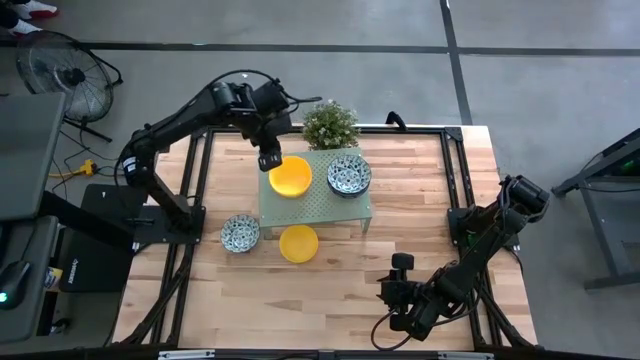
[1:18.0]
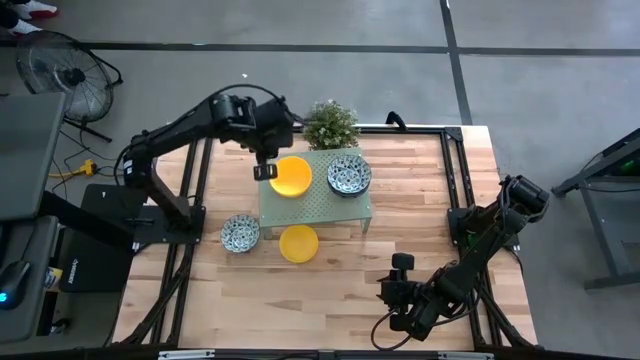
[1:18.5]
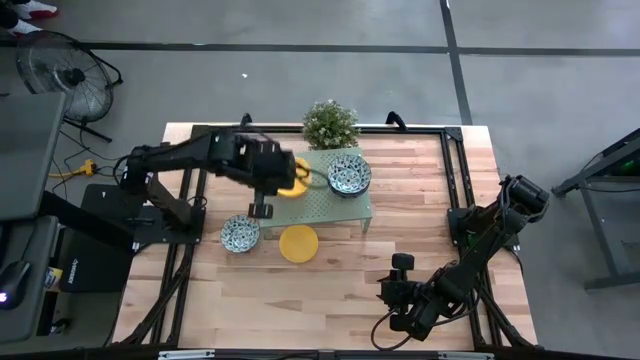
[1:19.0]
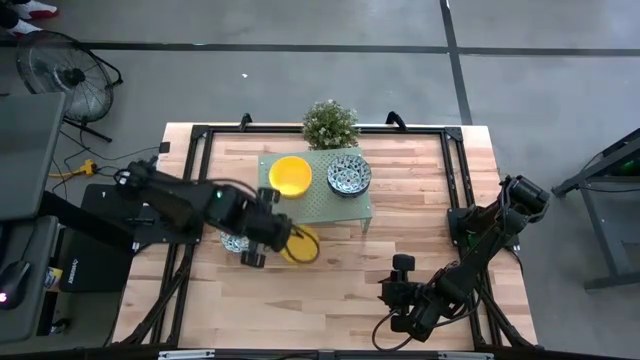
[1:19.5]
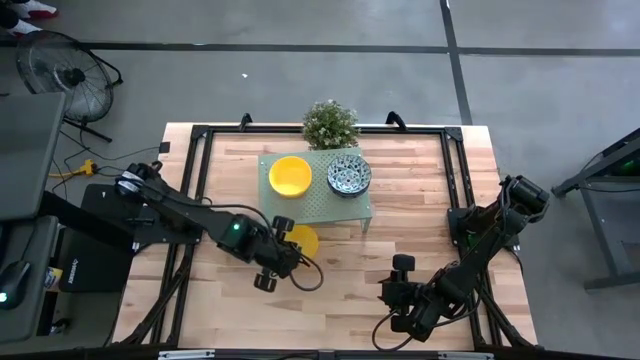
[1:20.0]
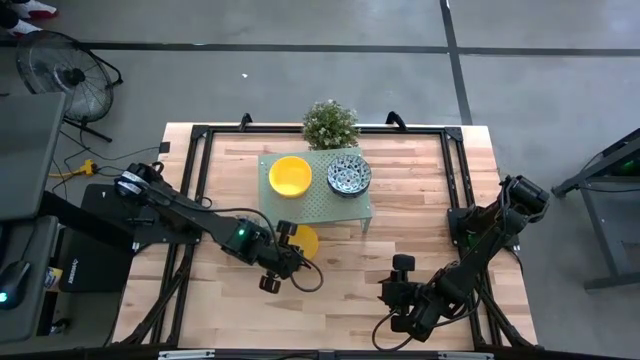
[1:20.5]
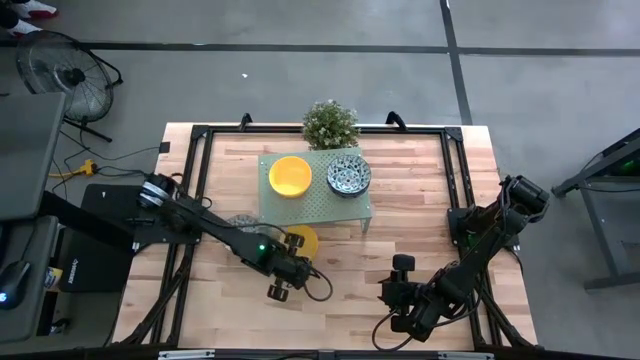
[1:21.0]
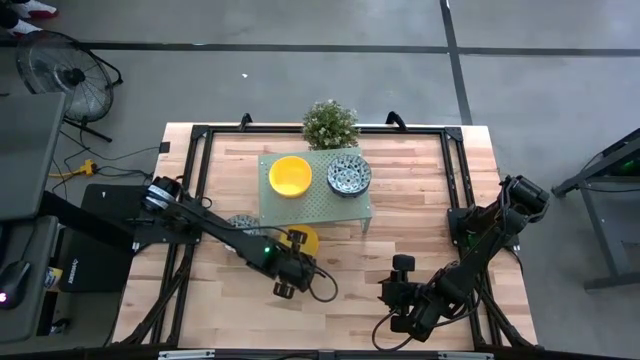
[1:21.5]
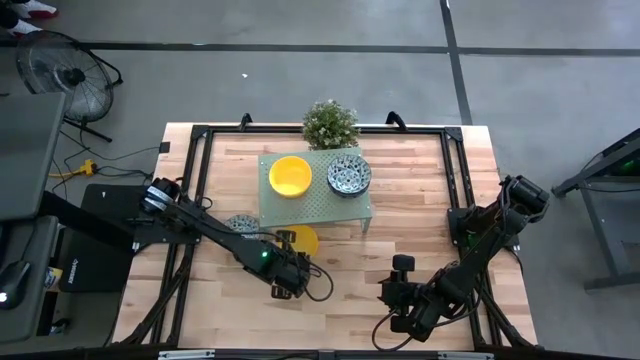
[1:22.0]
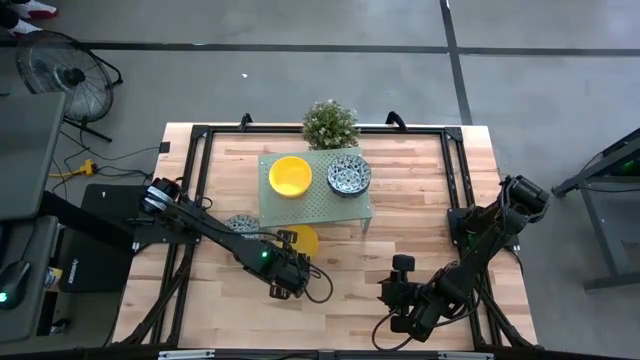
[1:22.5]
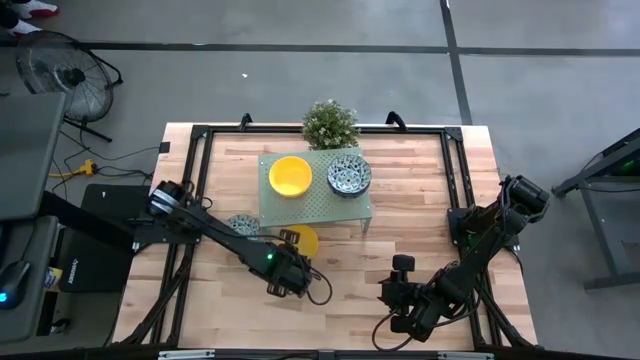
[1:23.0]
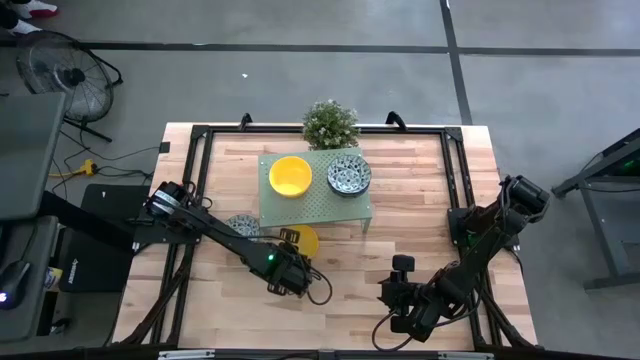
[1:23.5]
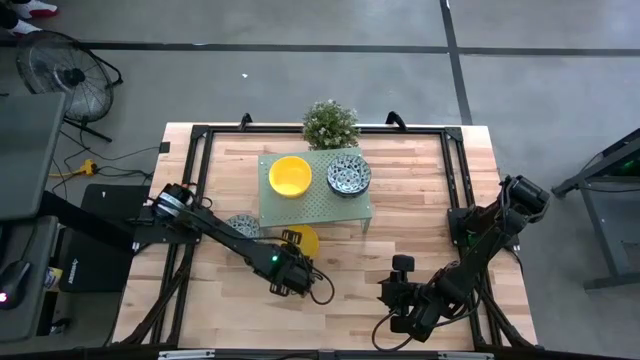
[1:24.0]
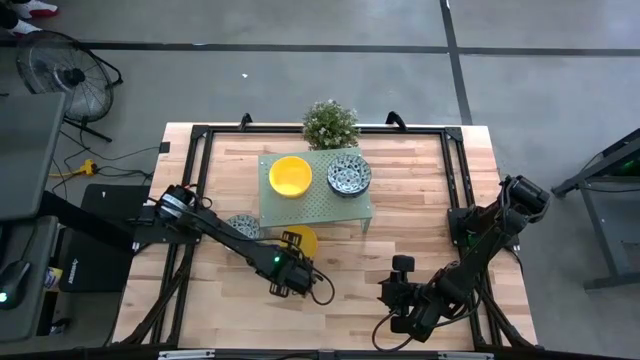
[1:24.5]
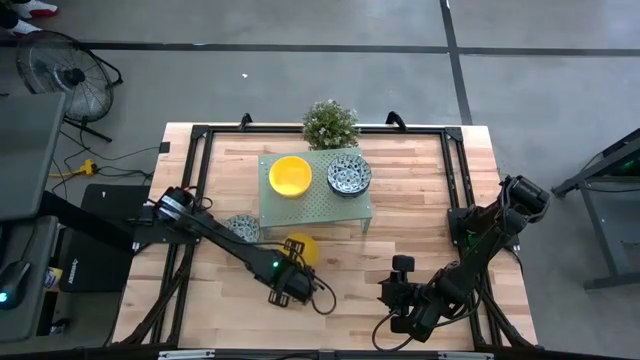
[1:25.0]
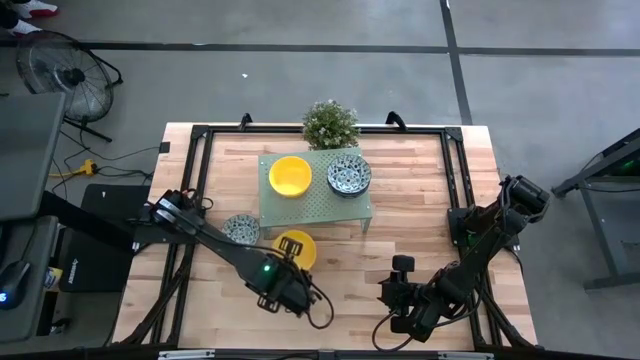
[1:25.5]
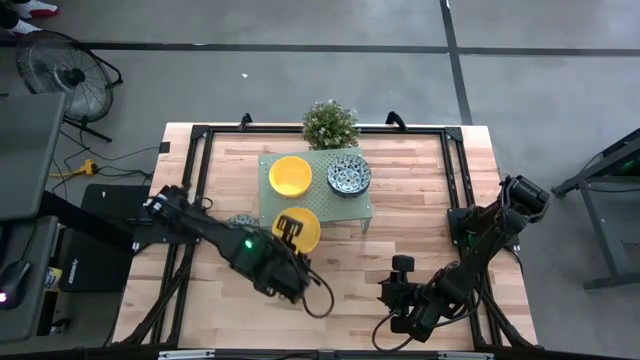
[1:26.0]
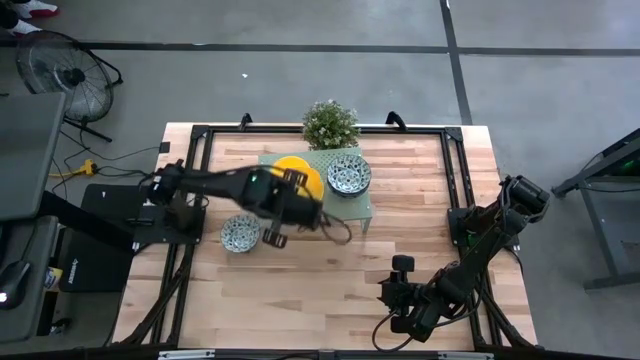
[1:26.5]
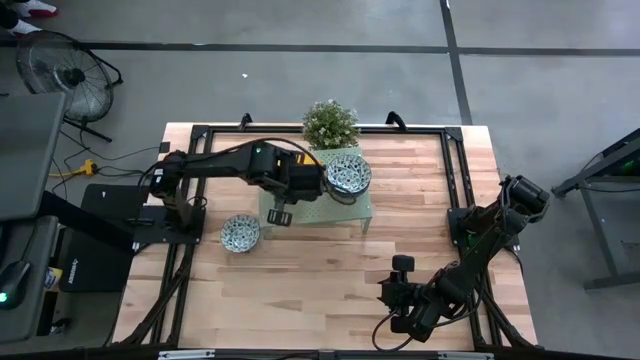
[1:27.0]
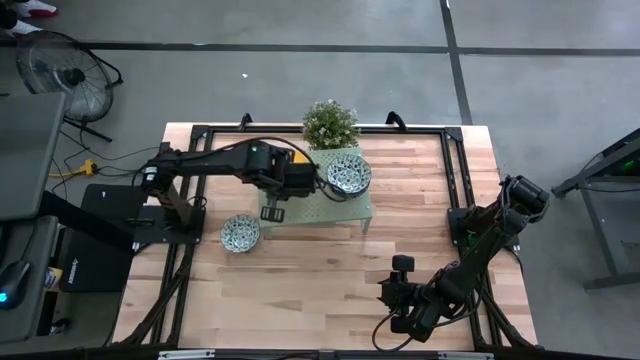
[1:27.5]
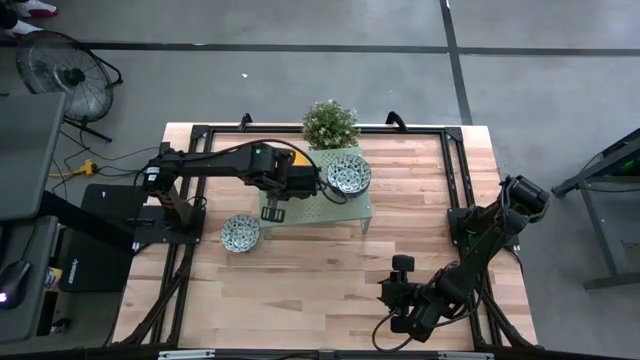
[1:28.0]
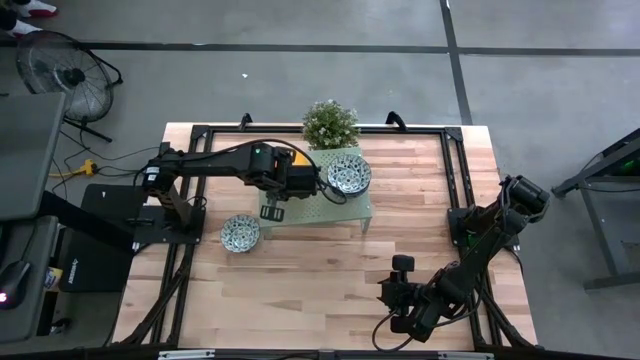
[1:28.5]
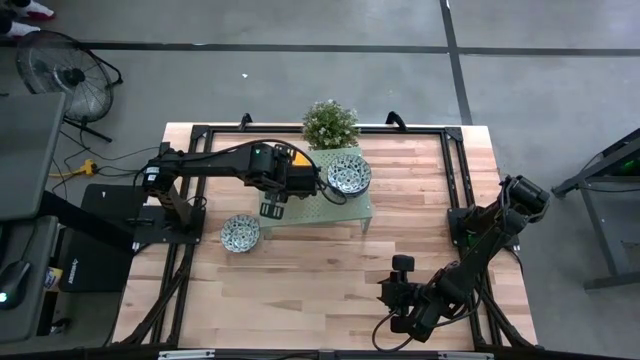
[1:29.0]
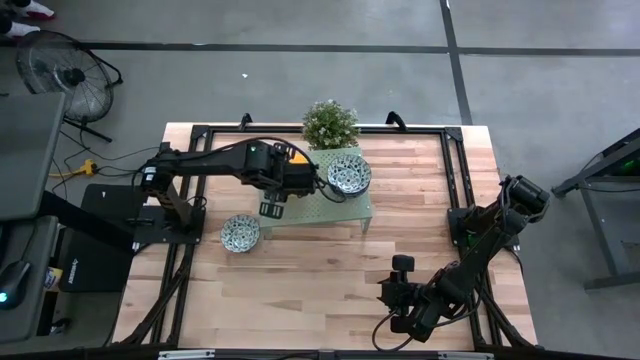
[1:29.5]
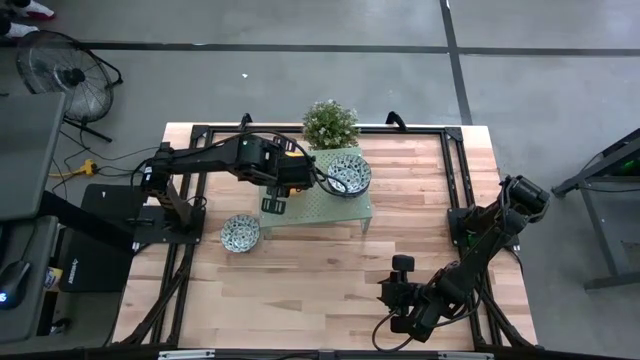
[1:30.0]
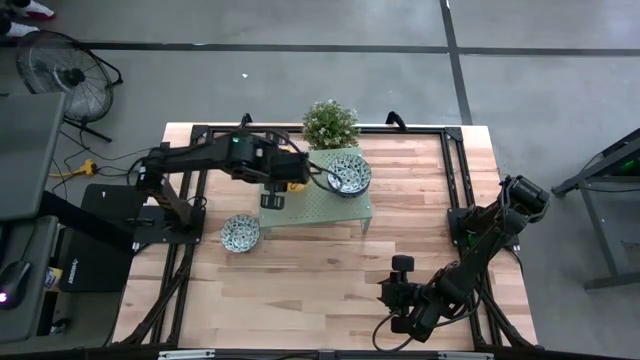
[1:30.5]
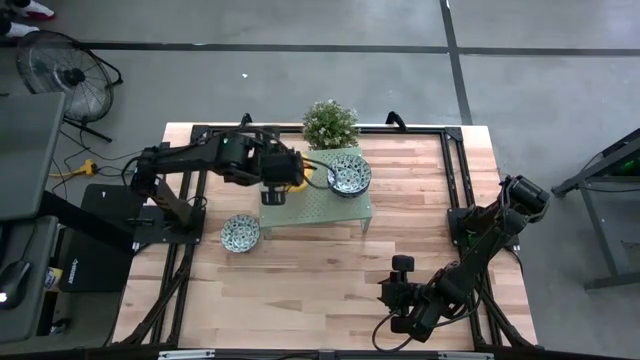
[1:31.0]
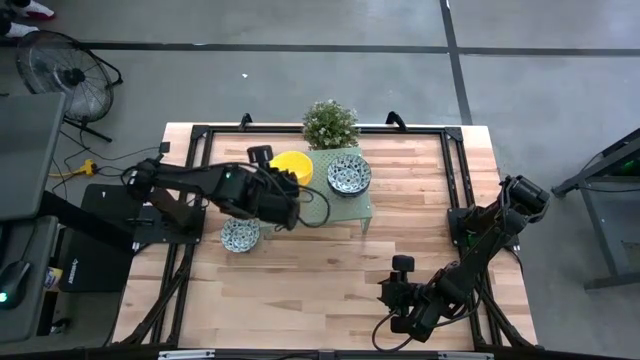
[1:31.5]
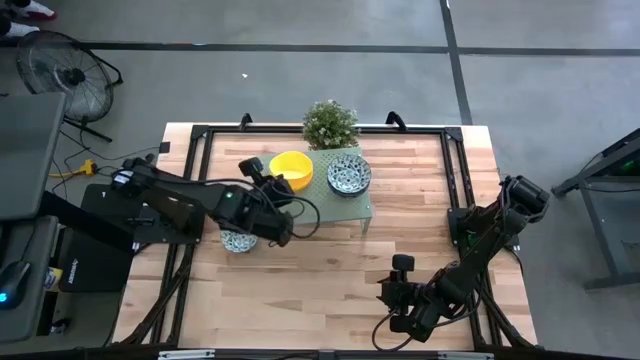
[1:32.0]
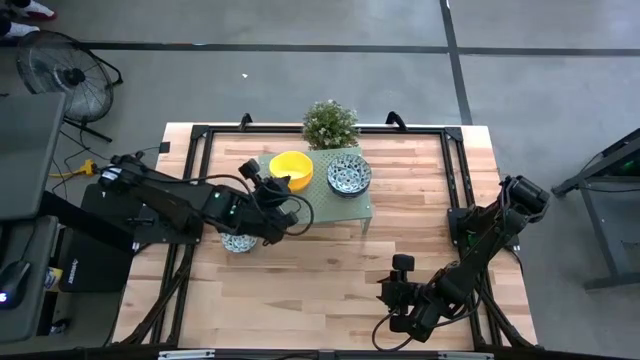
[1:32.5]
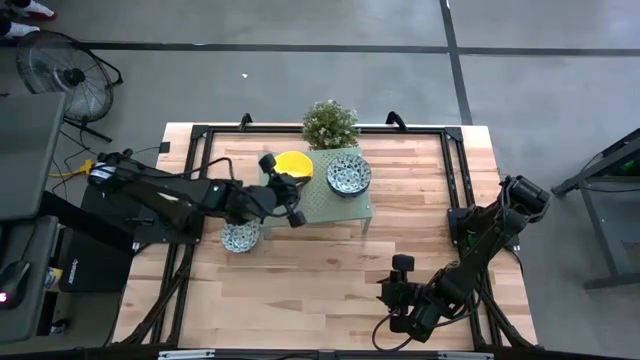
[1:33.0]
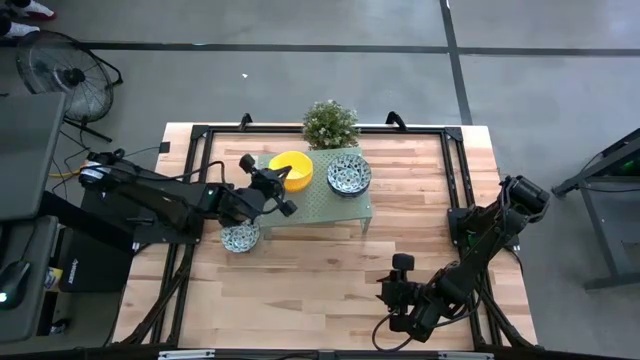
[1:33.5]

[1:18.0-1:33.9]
Task: Pick & Place Mini bowls
Stack the yellow bowl on top of the yellow bowl on the shelf
